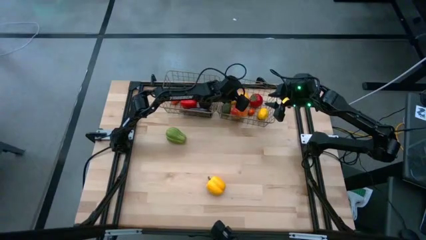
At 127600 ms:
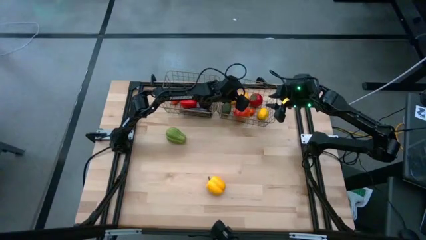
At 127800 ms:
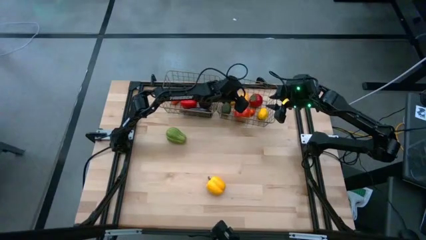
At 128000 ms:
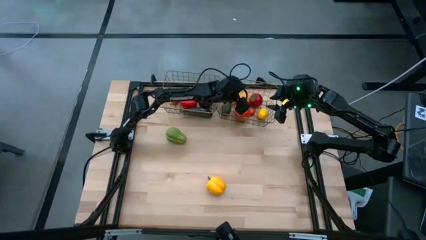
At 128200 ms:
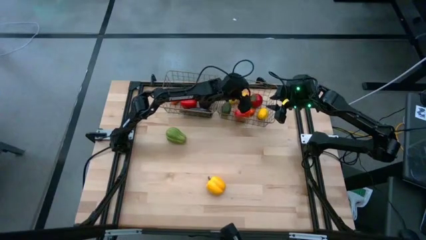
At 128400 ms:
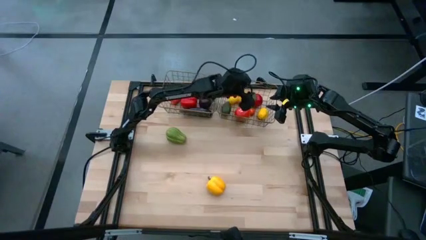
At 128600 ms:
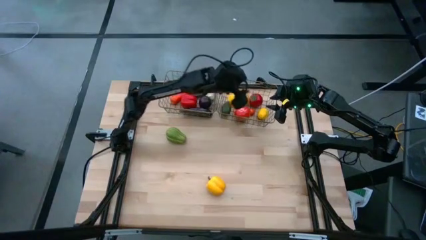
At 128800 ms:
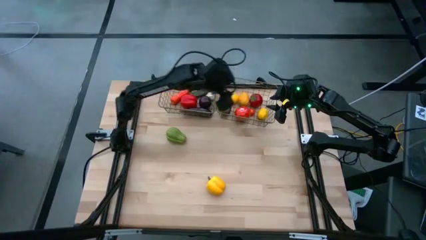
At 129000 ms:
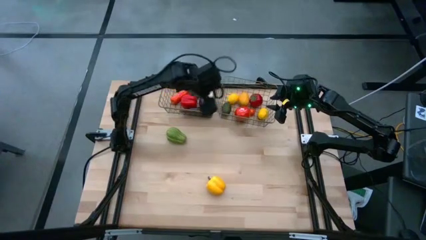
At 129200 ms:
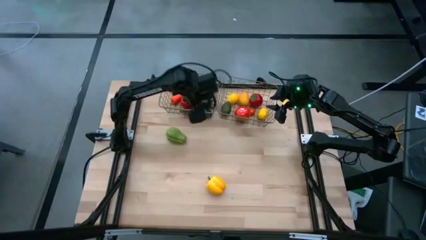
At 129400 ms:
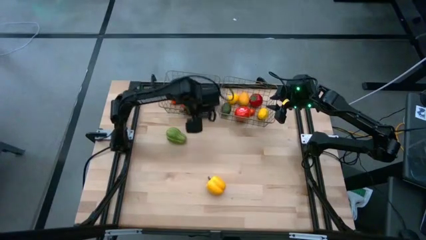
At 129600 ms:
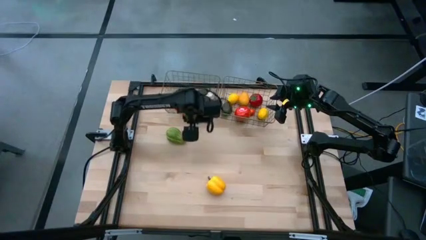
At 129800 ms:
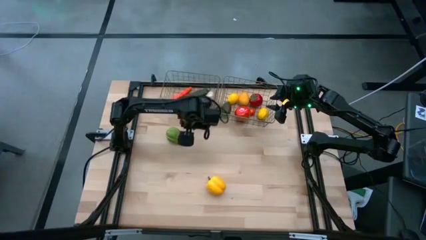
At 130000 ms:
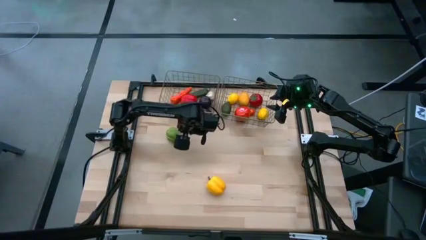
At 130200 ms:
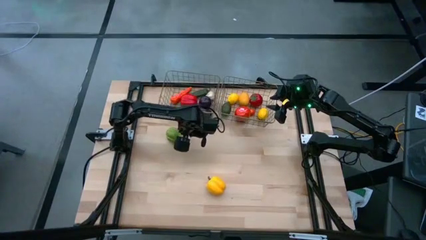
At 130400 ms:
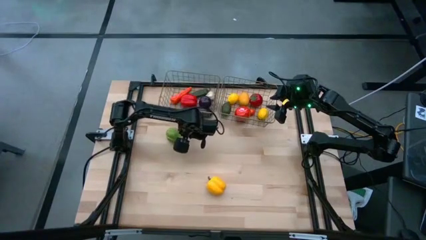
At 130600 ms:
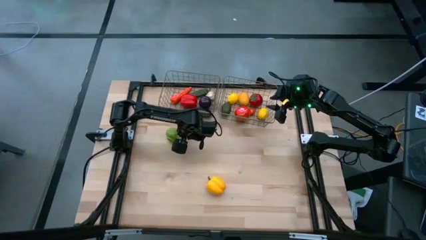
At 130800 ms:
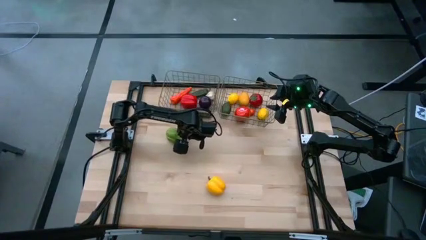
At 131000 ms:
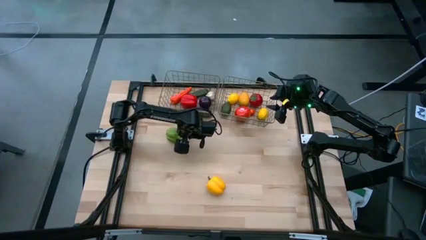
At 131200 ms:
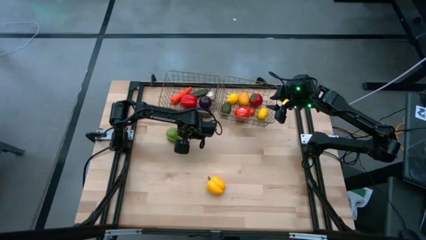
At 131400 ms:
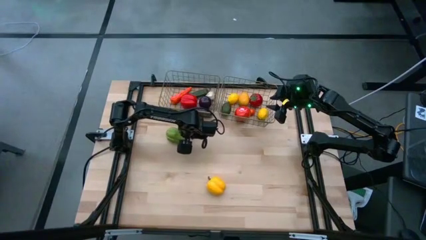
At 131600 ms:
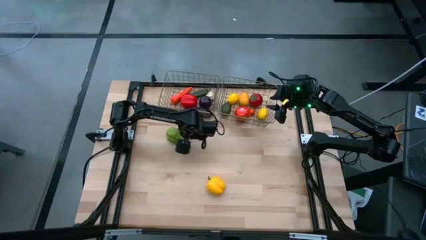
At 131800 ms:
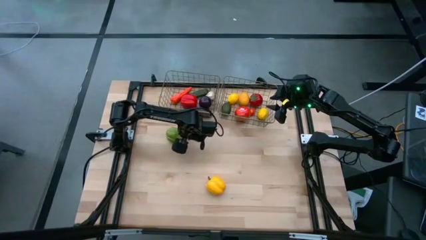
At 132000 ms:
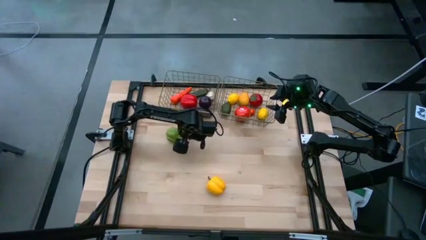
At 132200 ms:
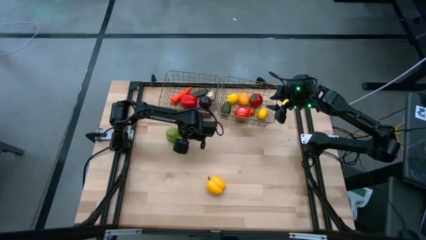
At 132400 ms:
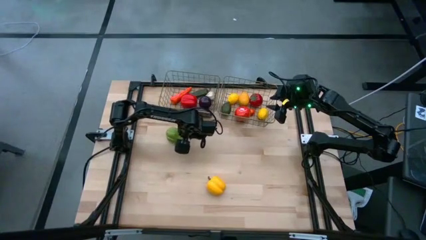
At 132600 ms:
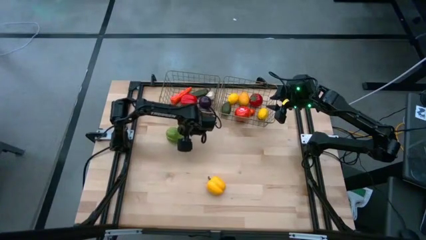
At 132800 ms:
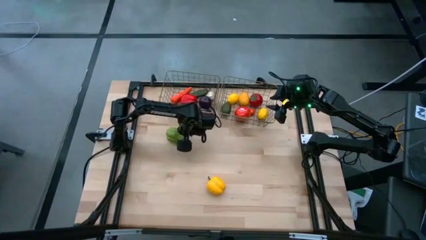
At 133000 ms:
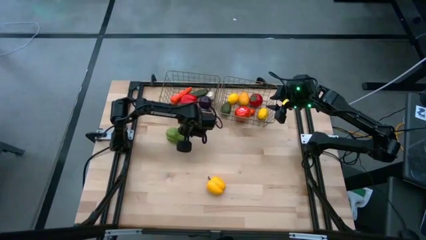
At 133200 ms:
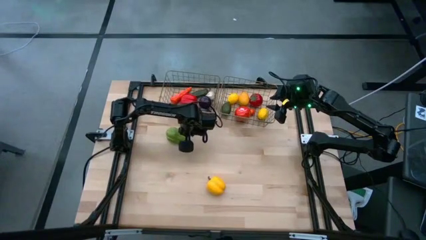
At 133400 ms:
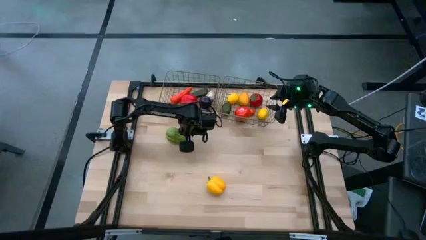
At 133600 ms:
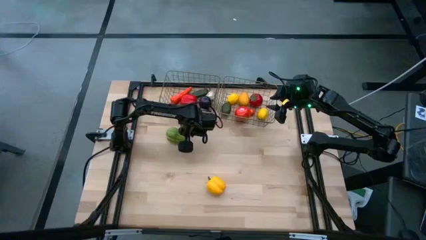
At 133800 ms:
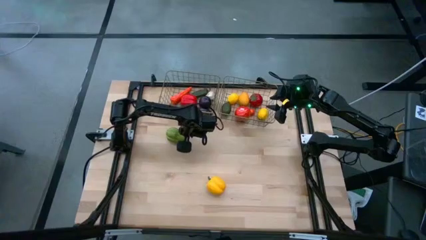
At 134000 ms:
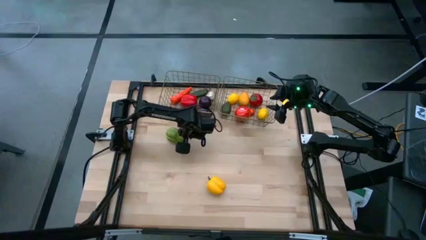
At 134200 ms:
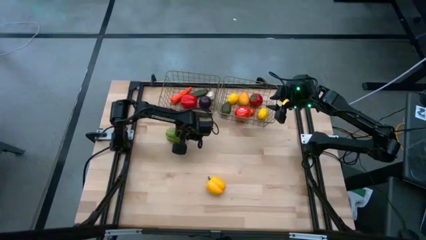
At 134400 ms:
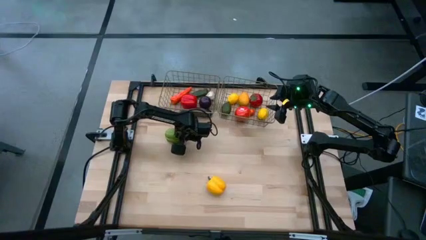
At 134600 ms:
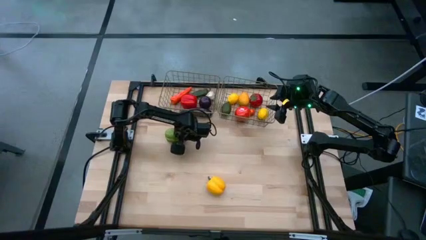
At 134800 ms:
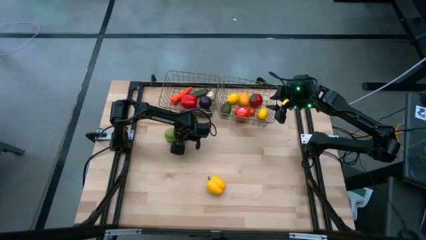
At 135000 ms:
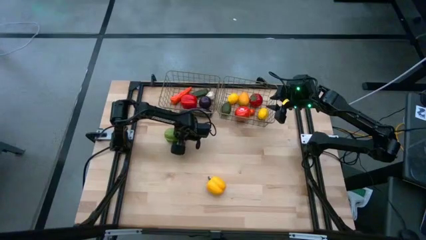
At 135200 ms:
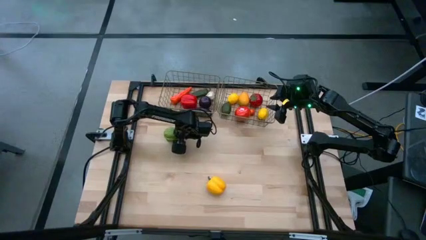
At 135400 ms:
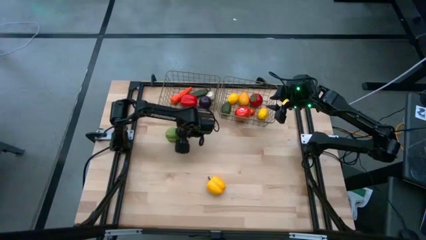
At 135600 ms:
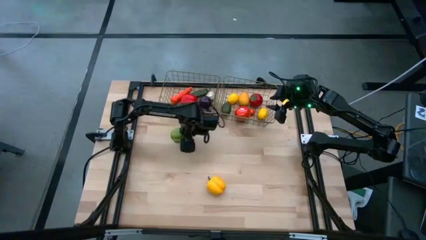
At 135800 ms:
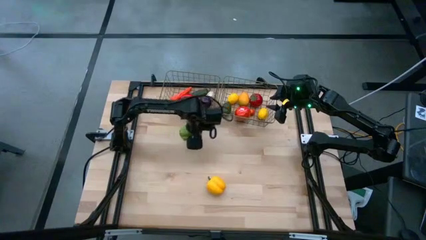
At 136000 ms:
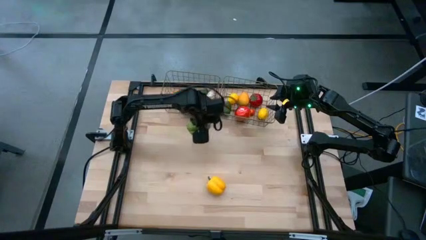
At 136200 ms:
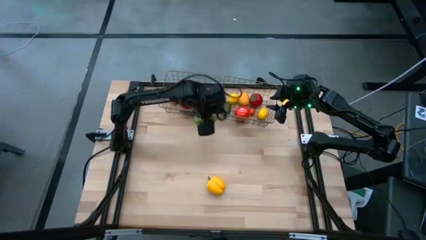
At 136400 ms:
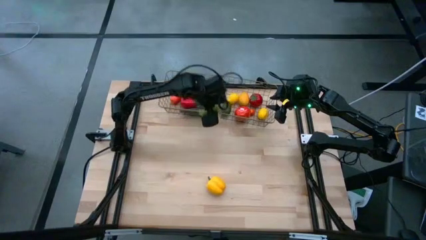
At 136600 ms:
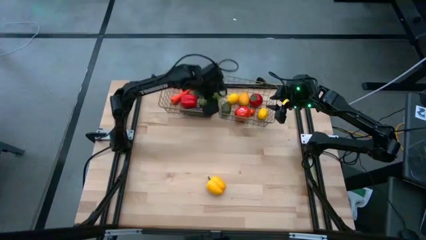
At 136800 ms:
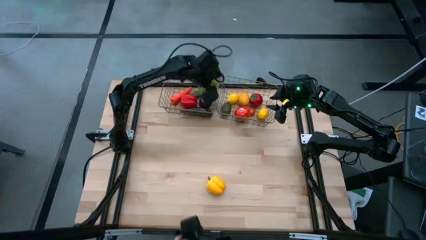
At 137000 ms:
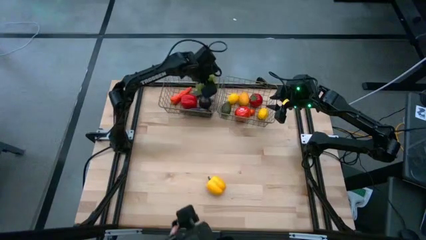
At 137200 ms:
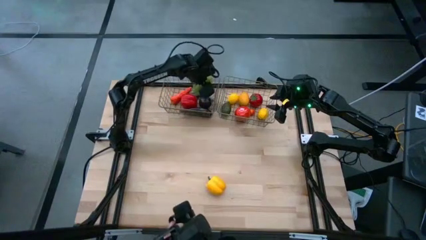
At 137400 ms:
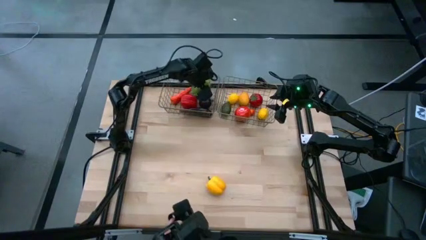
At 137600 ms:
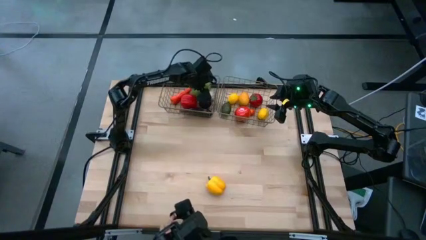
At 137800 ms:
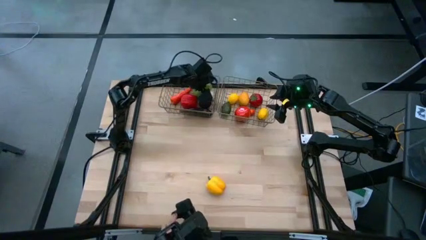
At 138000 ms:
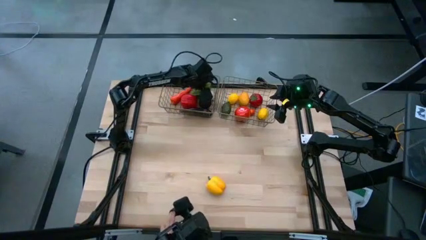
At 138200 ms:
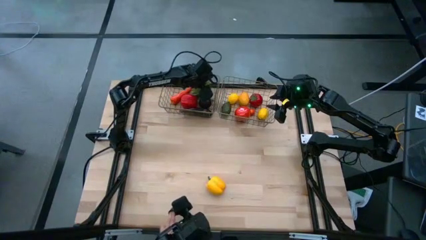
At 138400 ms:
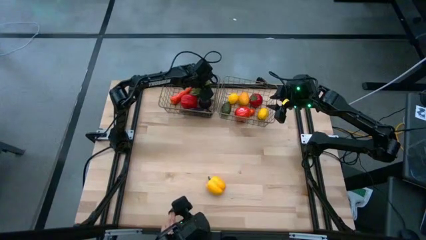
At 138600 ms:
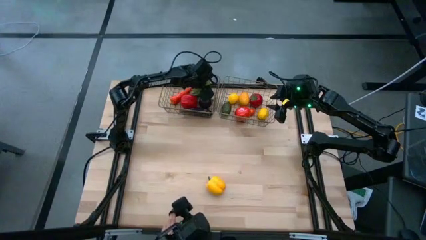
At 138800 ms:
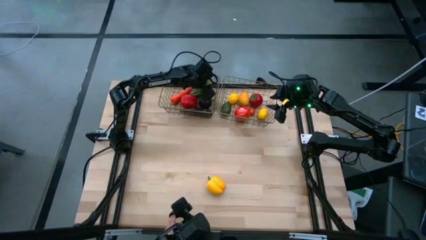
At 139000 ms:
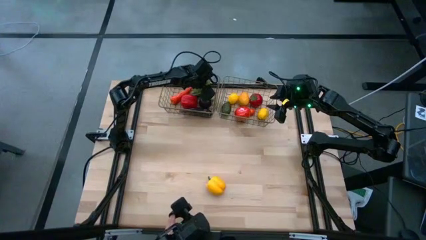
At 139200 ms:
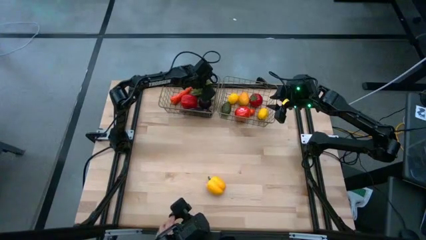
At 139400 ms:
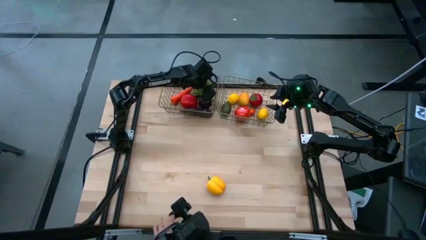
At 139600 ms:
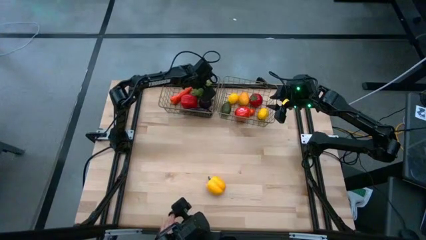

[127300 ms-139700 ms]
Task: Sort produce into baskets
Put the green chayote into the left golden wire basket

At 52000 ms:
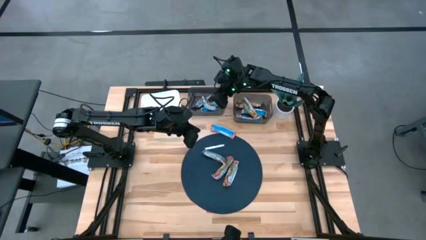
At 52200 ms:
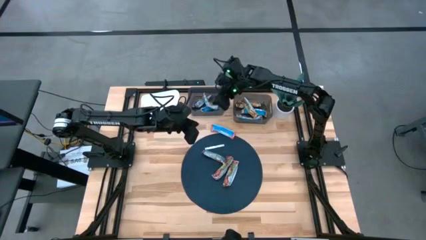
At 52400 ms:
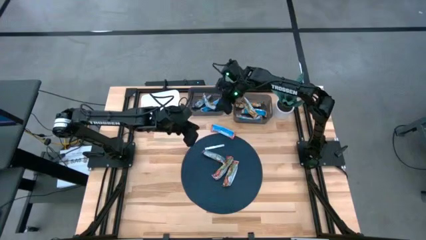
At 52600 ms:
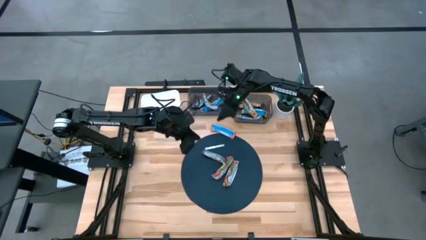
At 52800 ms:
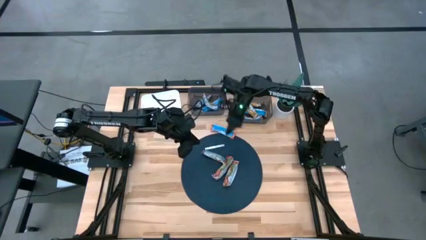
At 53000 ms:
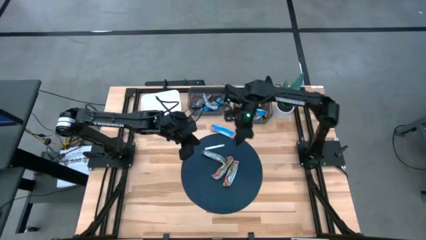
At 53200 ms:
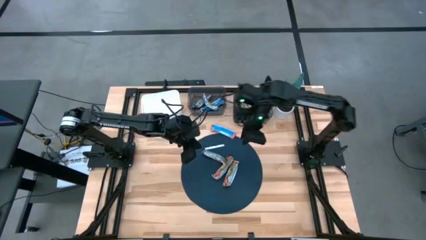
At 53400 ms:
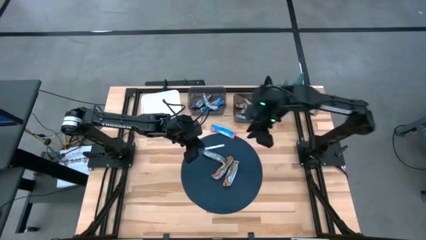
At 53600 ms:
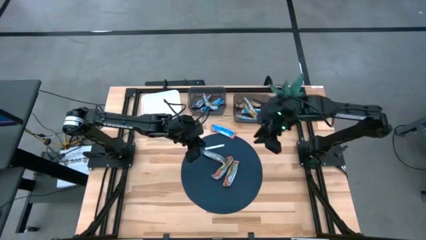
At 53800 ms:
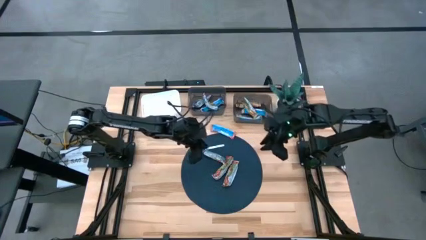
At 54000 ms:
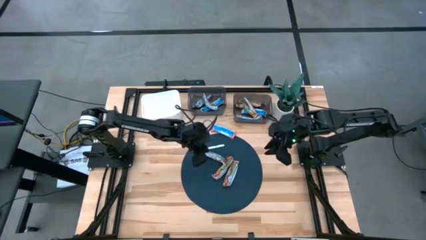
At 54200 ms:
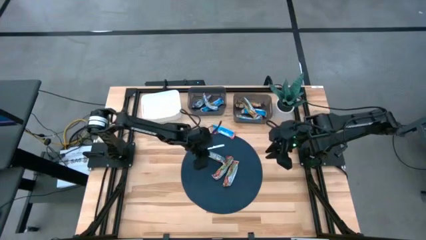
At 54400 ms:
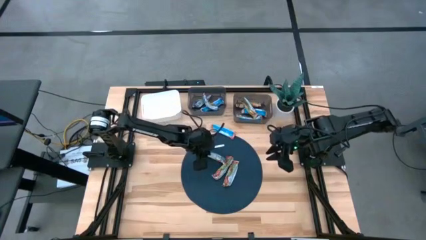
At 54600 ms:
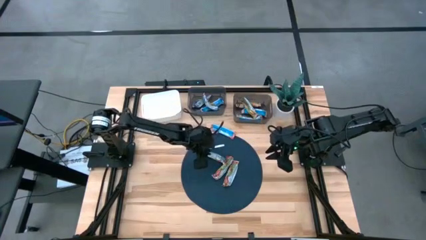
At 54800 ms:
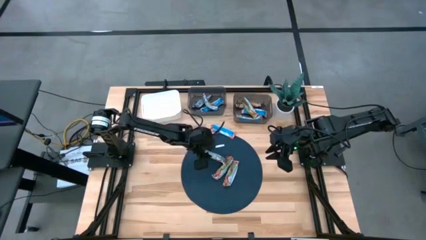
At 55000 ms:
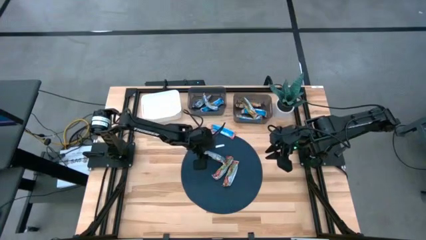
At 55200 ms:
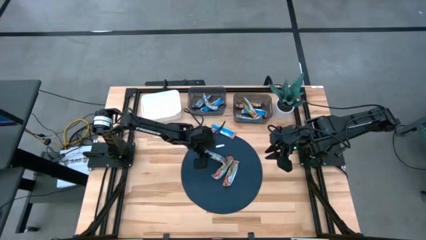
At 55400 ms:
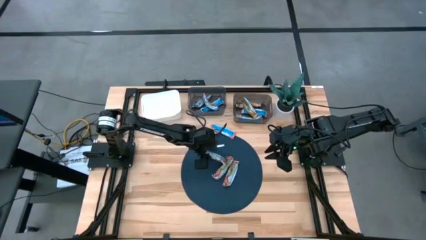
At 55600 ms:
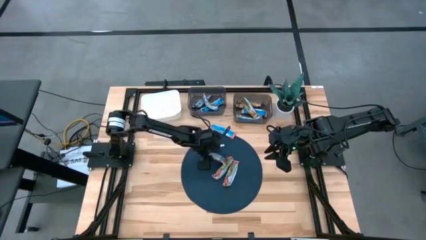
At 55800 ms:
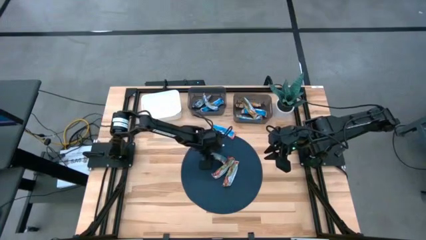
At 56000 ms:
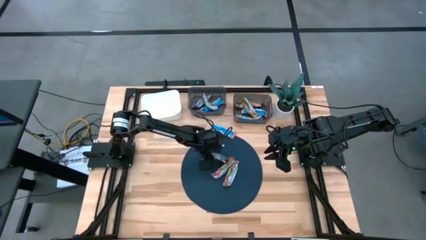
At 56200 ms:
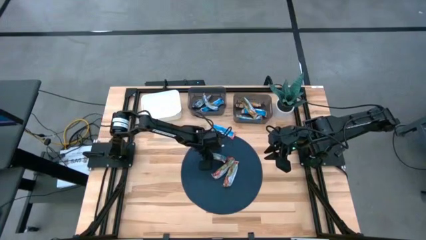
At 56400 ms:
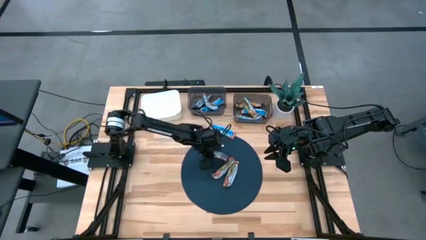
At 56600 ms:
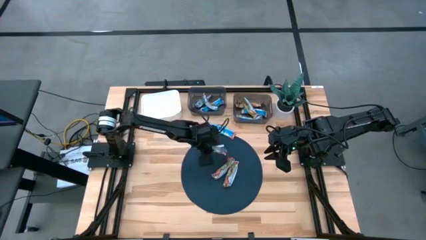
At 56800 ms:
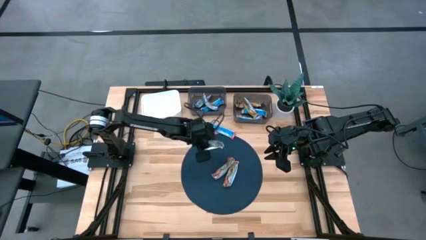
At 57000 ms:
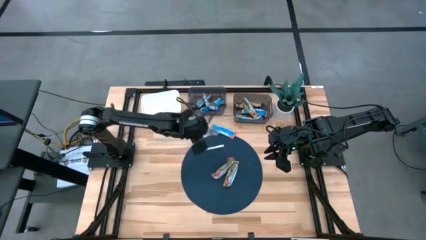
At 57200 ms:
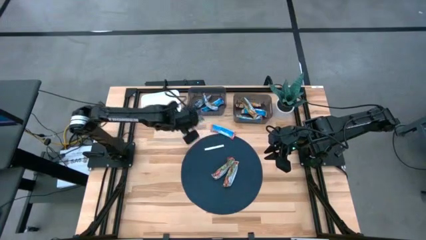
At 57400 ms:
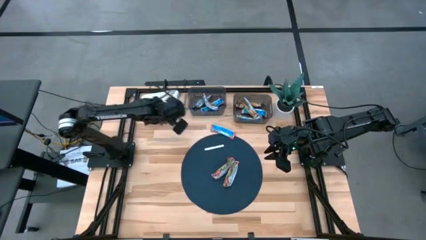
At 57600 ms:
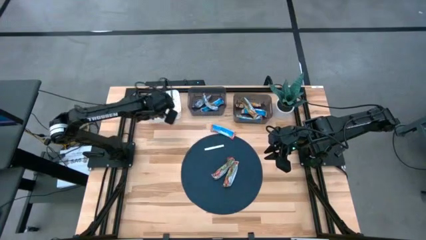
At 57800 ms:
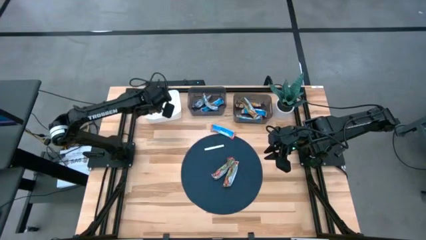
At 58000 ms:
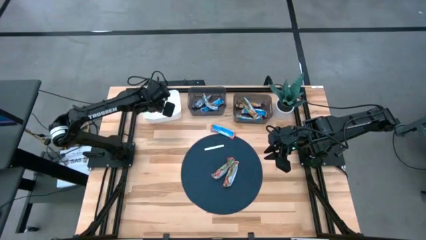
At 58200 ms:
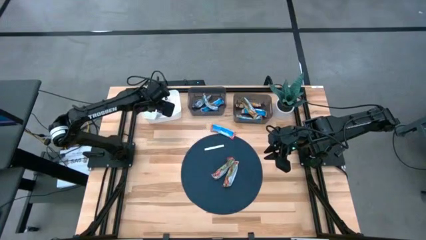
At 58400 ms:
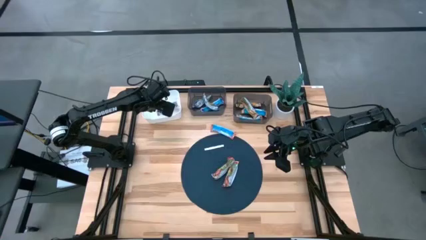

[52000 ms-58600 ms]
Task: Pick and place Granola Bars by type
Put the red granola bar into the white bin
